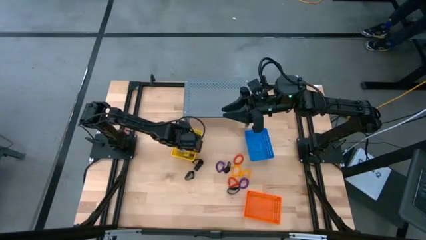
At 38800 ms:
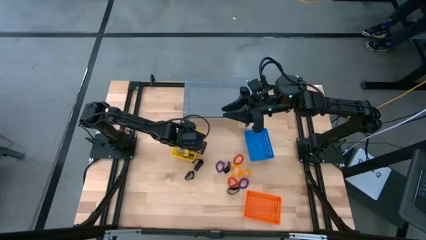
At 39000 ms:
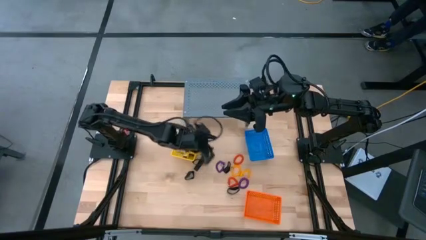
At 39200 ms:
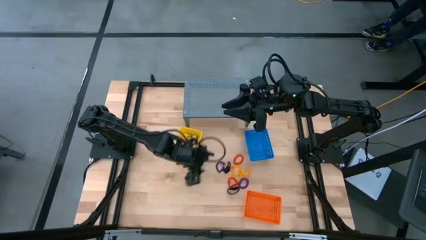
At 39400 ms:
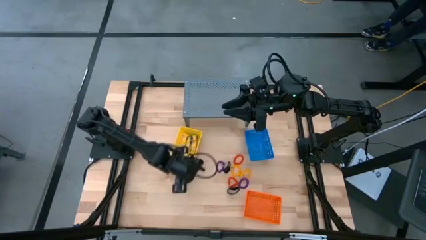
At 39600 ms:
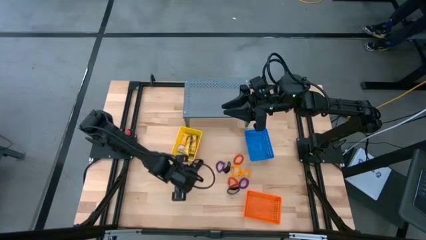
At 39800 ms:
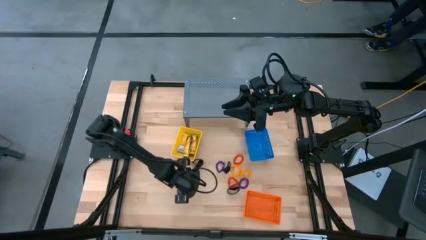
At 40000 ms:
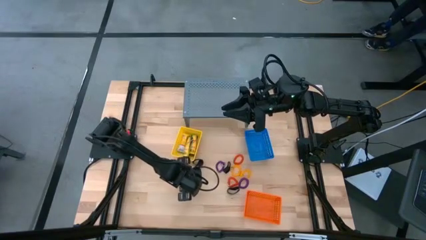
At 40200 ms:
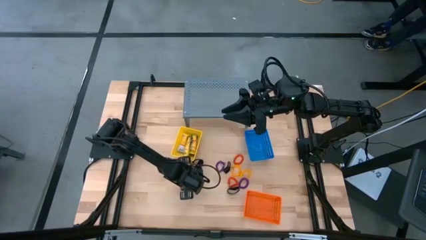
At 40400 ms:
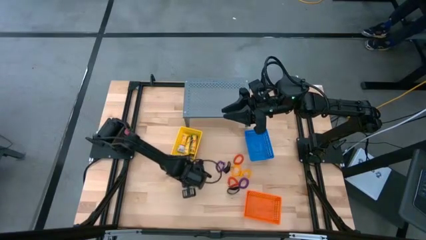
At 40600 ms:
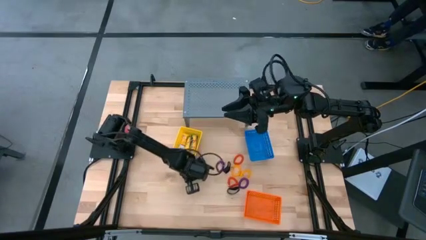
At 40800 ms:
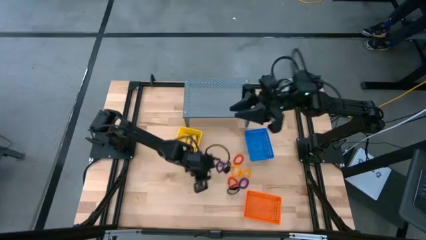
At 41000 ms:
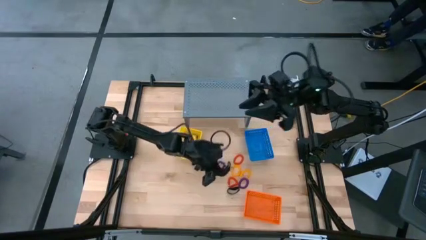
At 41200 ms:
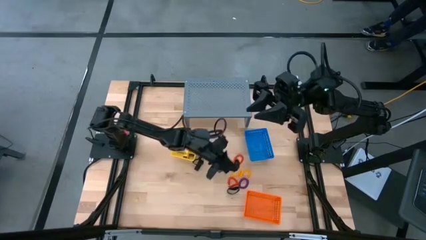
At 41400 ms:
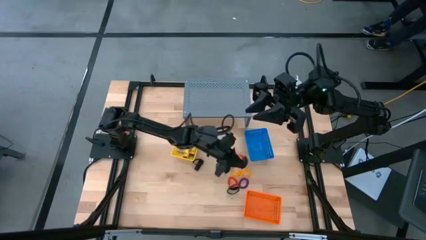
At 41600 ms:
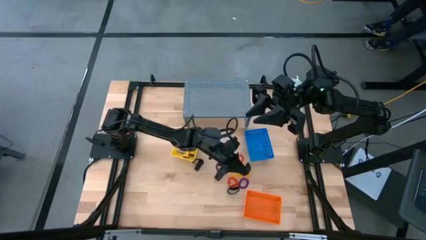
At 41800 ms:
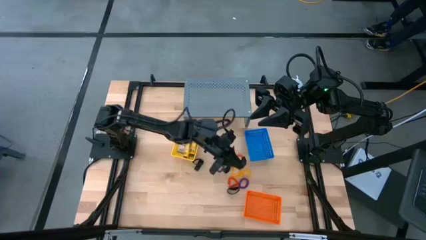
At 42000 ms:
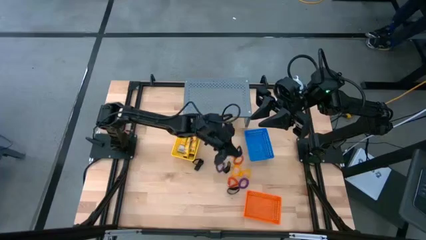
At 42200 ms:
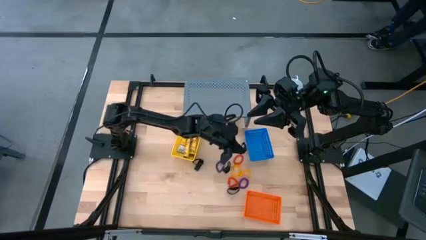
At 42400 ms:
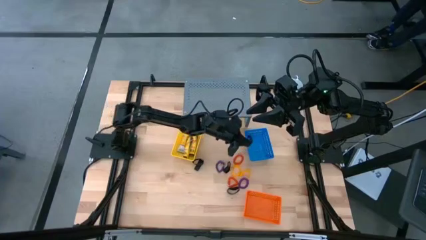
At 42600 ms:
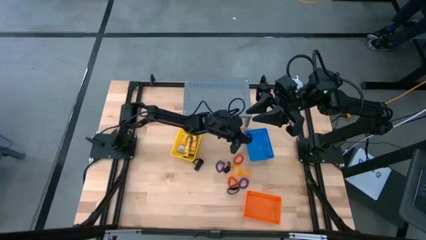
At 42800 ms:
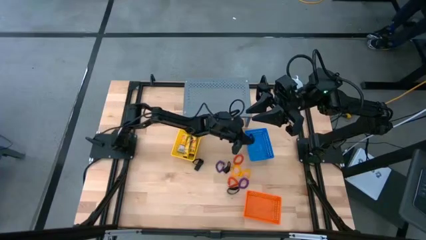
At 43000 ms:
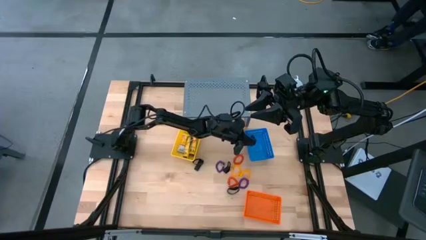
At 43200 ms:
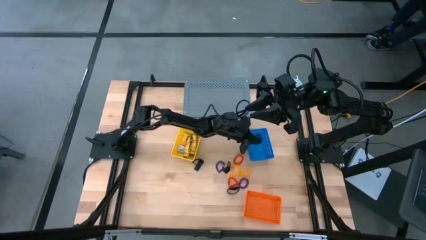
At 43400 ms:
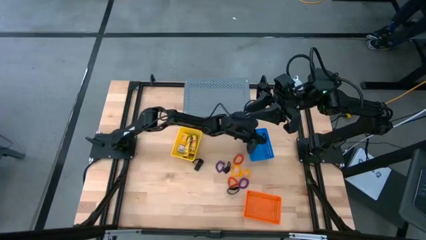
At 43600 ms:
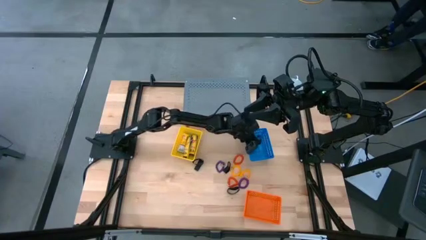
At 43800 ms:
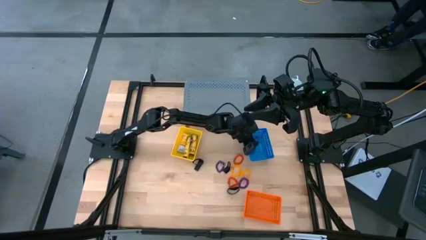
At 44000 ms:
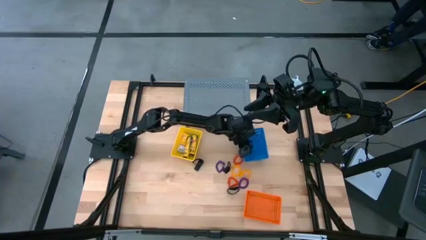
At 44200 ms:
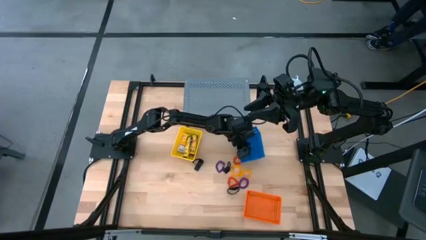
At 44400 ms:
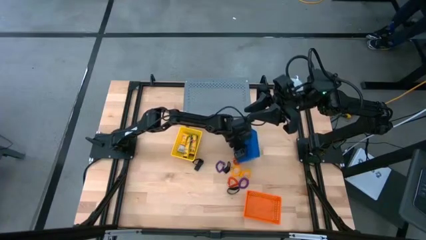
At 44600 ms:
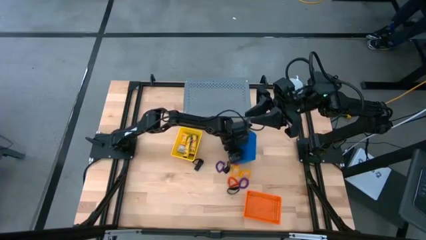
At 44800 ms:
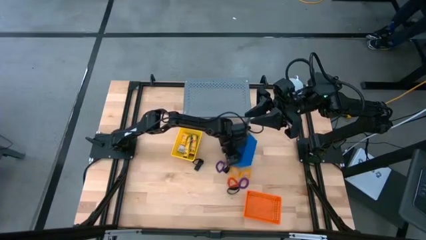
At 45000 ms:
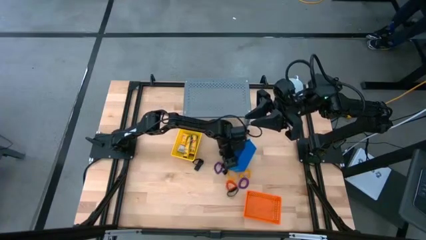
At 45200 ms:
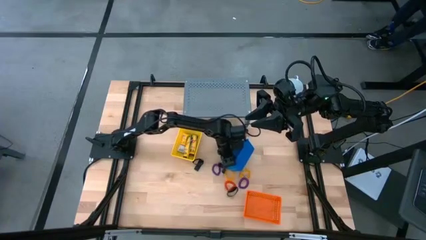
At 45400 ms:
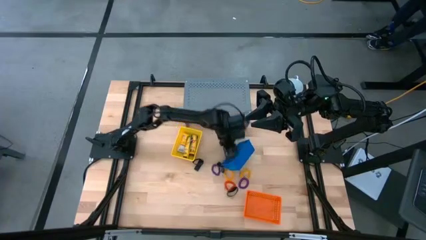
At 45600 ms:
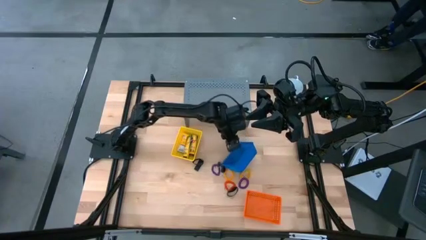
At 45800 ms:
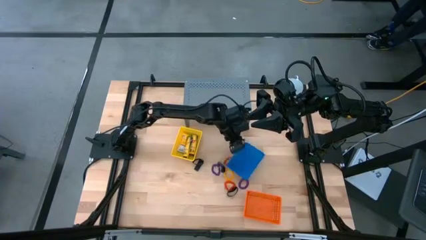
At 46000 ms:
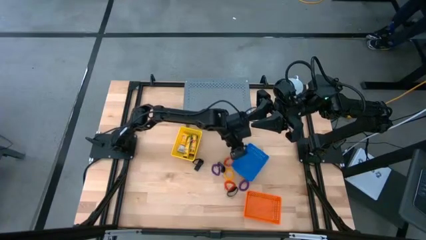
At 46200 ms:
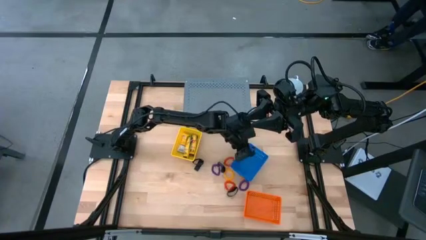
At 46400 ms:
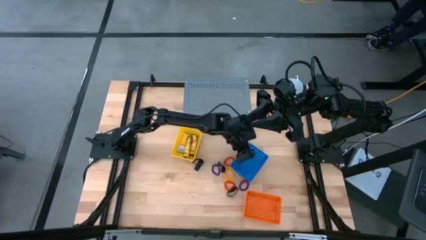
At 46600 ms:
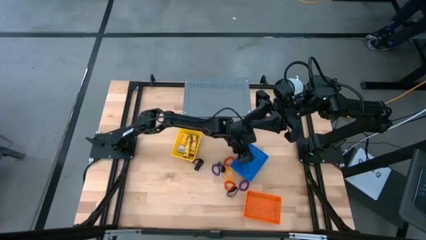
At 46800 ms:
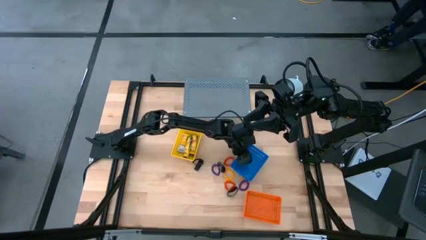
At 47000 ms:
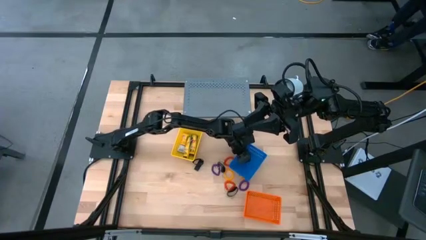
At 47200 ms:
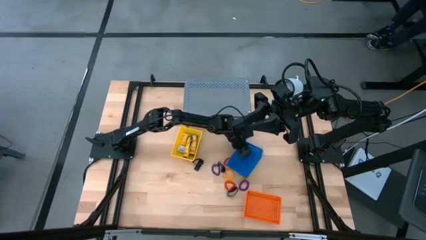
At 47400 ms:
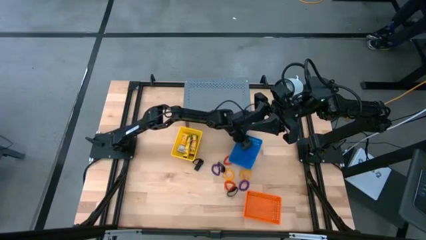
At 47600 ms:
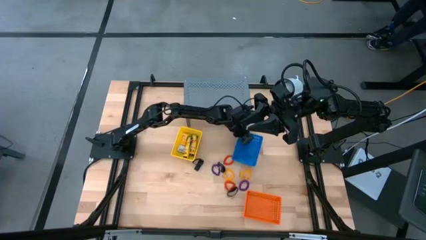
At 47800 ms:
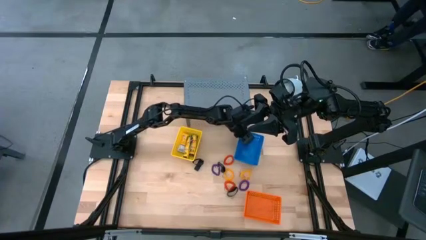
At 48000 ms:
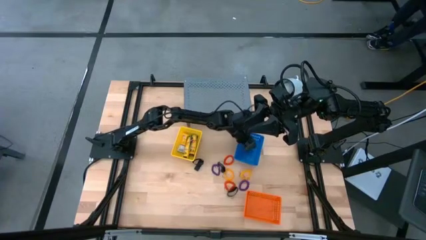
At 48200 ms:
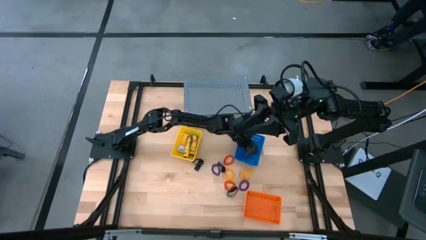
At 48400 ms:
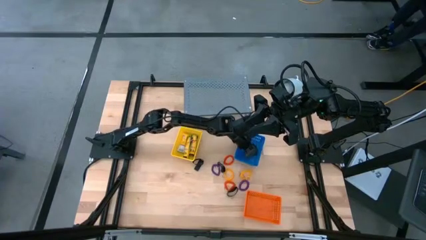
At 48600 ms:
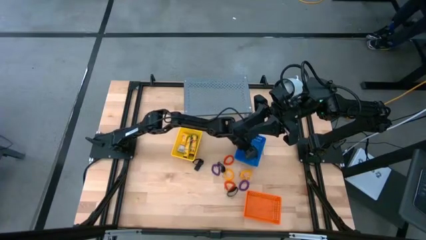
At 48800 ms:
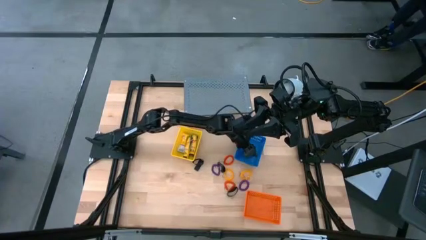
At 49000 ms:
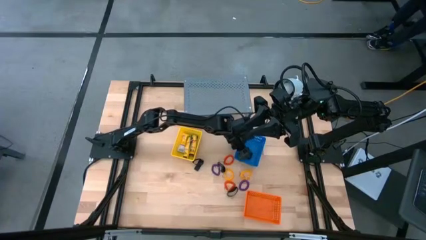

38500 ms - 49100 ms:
Task: Pick & Place Office Desk Supplies
Put the black rubber band into the blue bin

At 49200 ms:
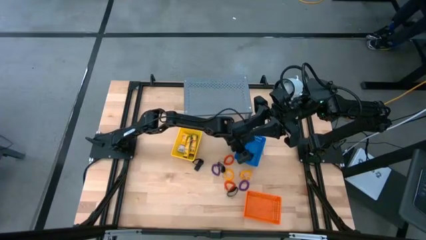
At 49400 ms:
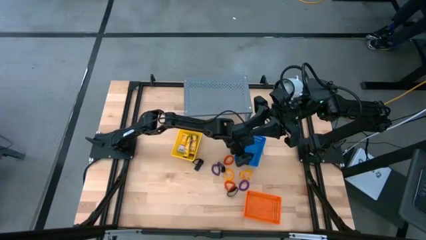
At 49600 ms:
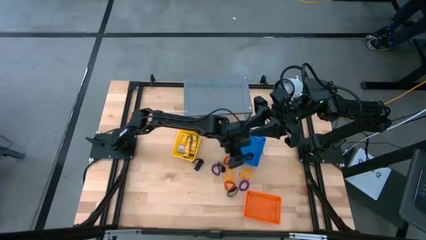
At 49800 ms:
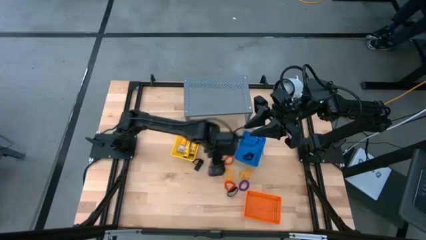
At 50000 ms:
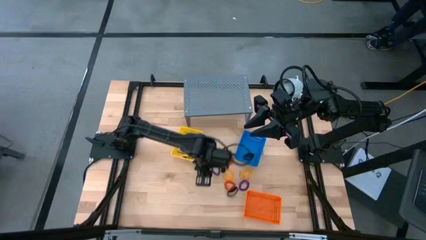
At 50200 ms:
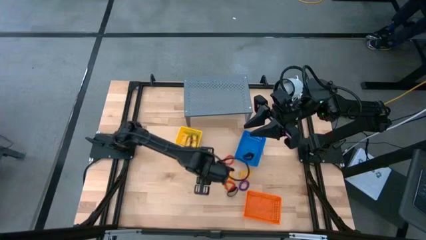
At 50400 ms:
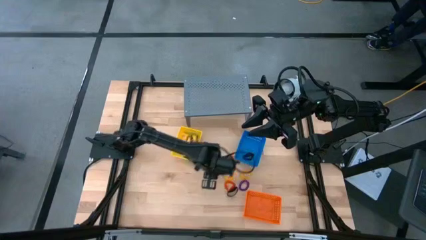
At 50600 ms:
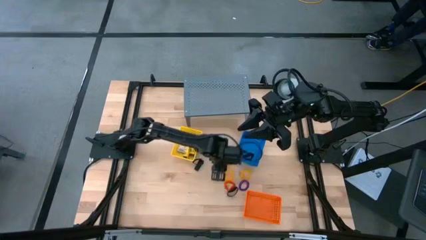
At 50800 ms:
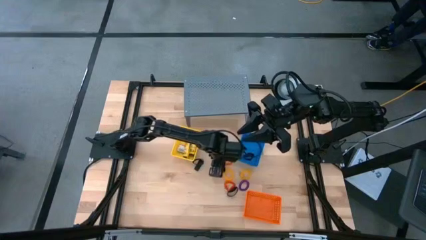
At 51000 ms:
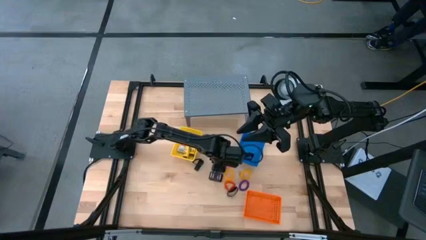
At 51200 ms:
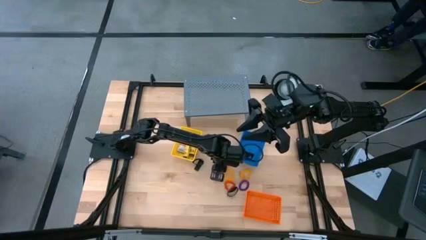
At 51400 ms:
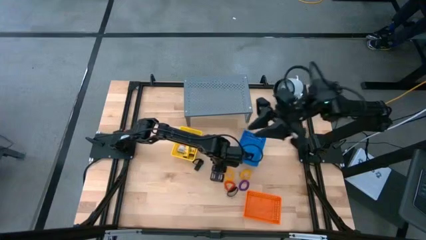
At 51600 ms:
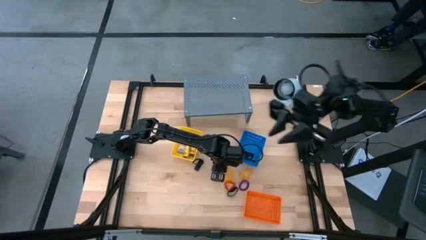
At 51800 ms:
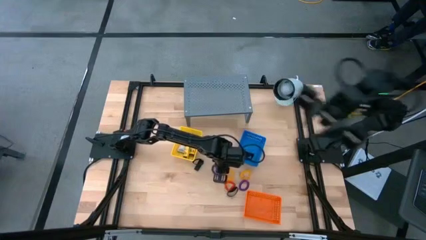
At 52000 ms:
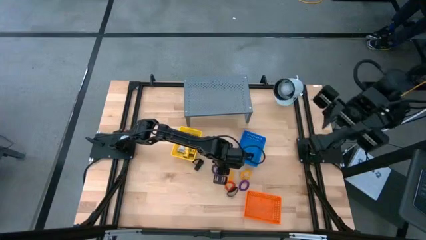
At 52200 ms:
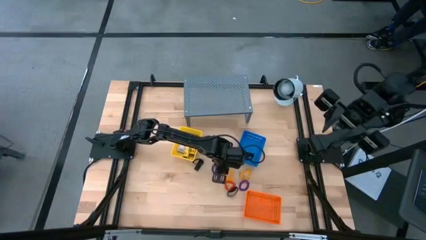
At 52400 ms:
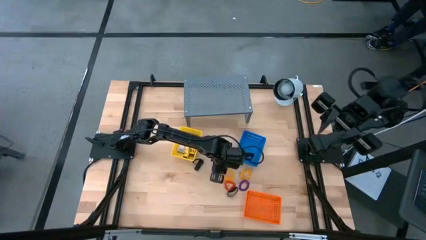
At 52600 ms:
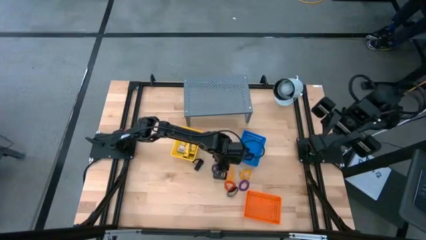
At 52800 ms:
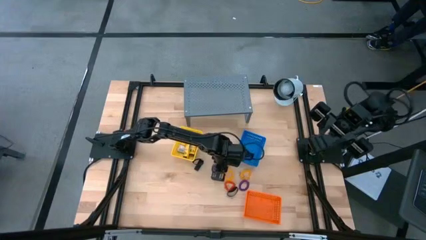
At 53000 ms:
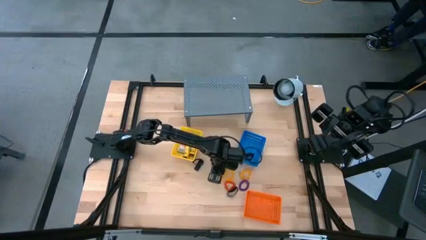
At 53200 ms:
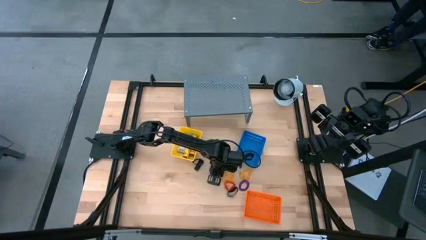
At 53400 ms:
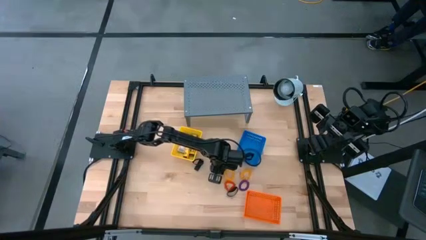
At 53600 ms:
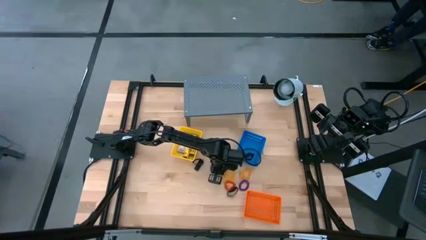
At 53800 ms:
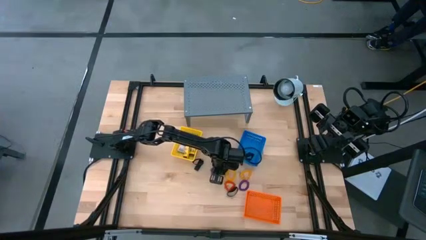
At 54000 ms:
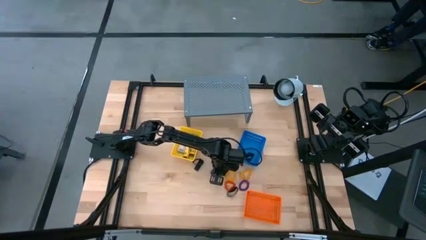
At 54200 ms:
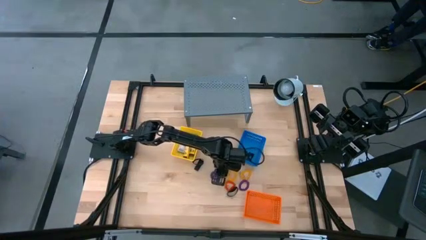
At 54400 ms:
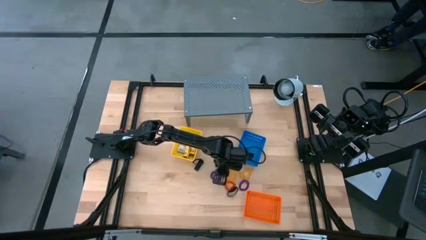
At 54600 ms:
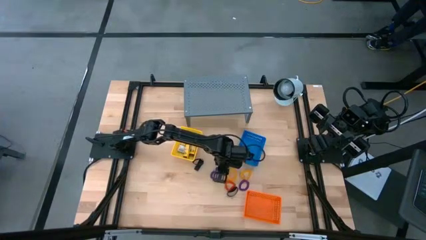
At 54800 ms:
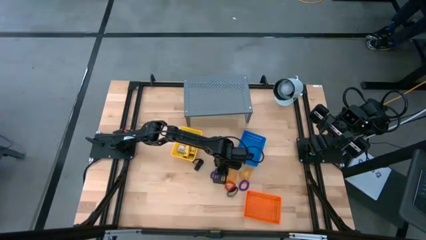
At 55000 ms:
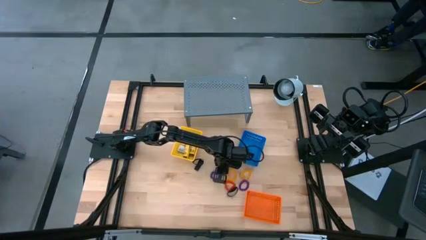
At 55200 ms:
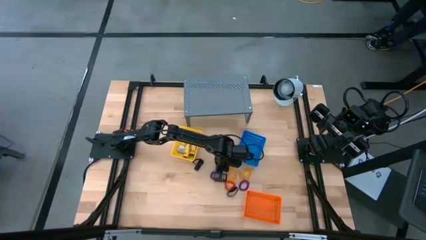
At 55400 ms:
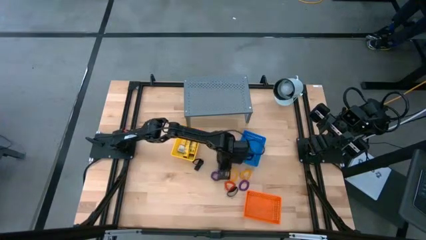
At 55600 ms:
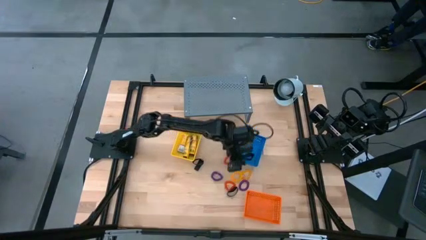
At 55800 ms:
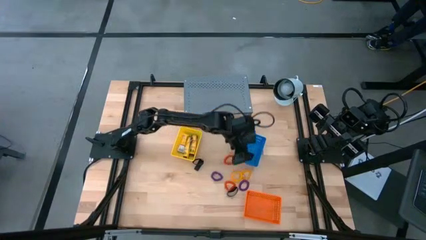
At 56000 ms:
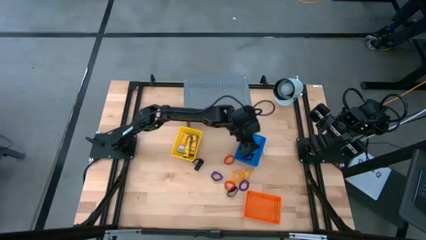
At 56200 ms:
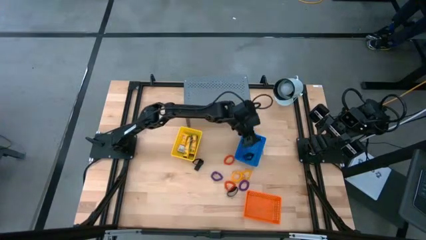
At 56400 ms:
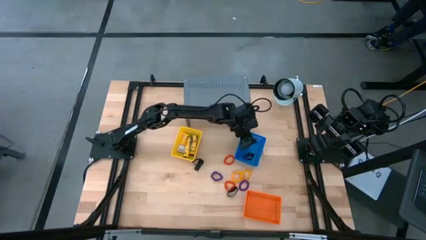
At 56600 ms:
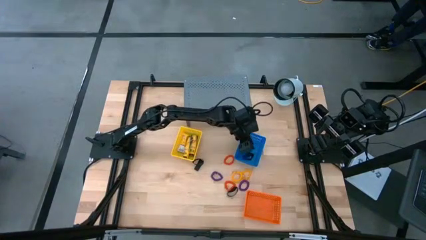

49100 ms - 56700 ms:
Put the black rubber band into the blue bin
